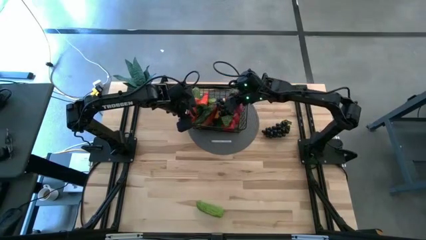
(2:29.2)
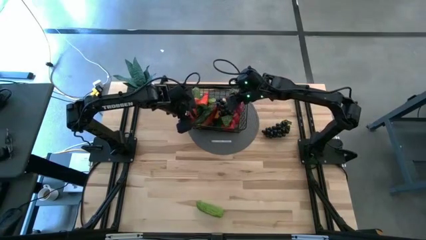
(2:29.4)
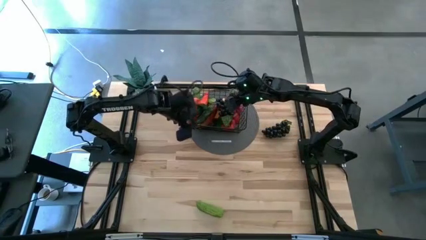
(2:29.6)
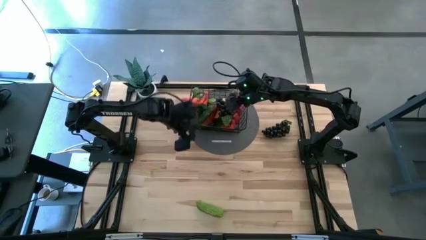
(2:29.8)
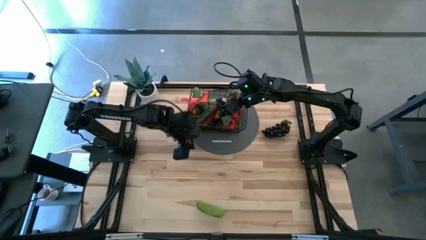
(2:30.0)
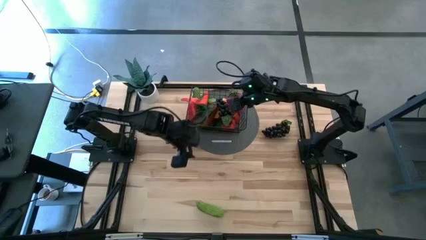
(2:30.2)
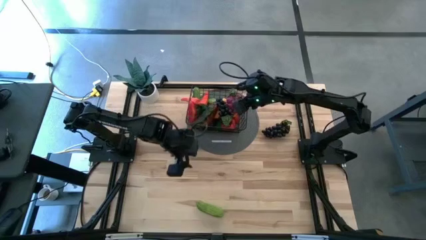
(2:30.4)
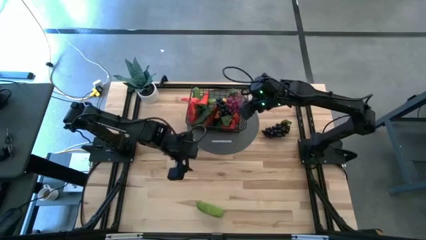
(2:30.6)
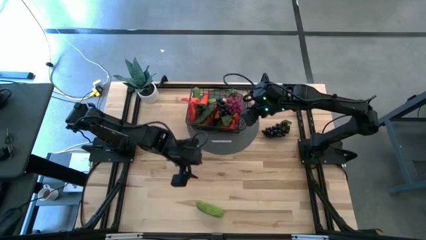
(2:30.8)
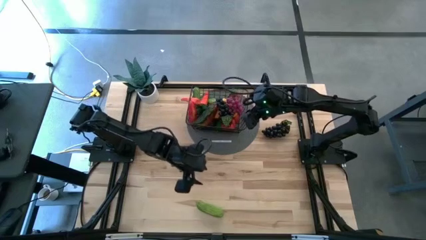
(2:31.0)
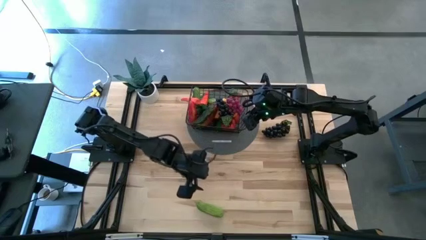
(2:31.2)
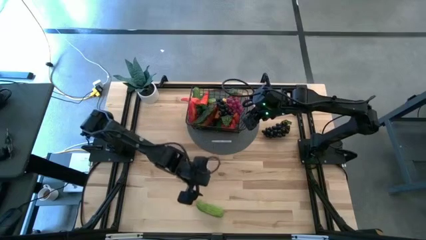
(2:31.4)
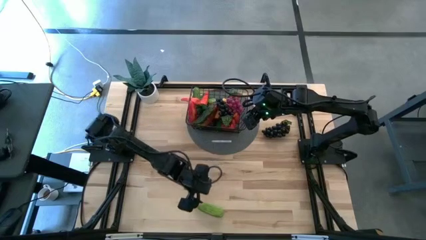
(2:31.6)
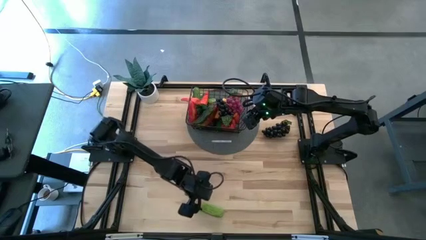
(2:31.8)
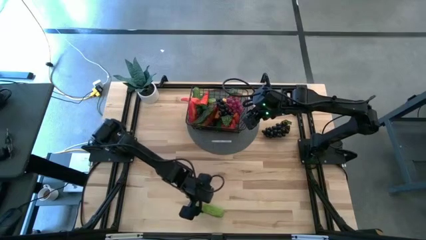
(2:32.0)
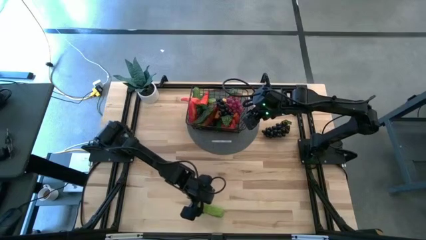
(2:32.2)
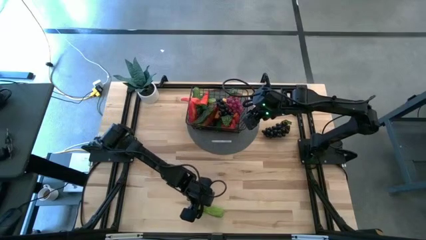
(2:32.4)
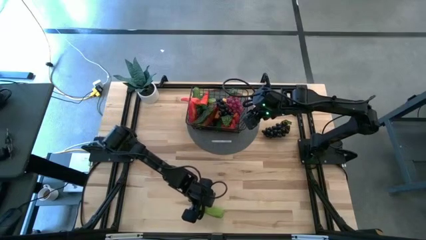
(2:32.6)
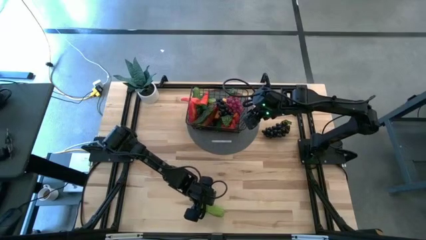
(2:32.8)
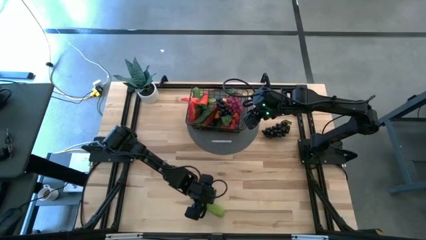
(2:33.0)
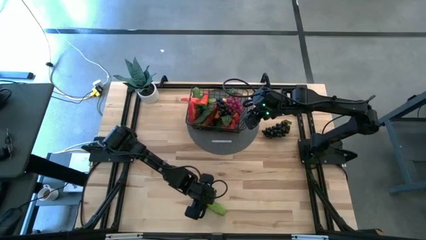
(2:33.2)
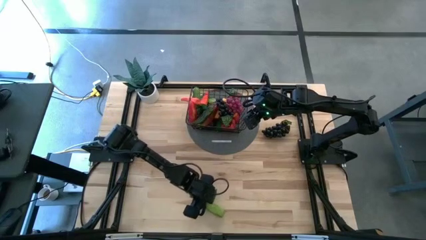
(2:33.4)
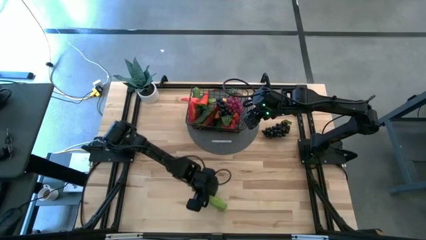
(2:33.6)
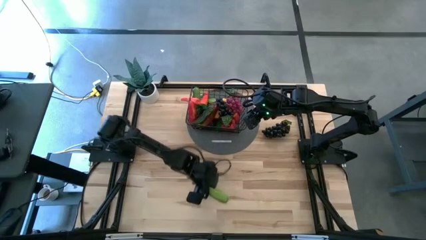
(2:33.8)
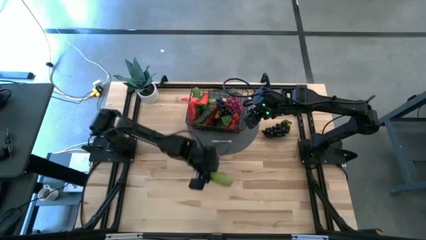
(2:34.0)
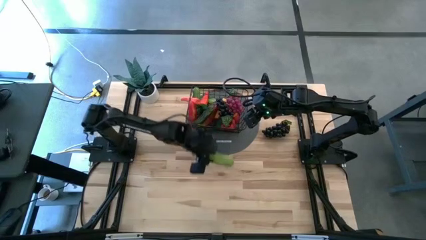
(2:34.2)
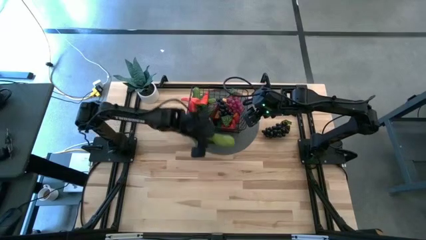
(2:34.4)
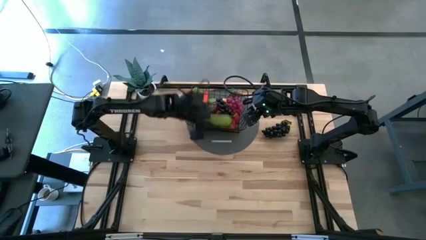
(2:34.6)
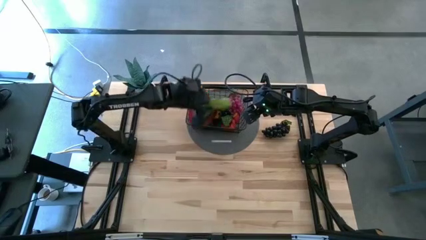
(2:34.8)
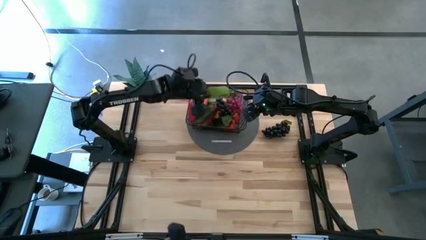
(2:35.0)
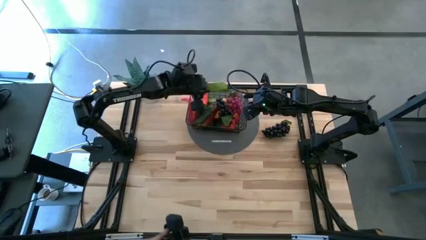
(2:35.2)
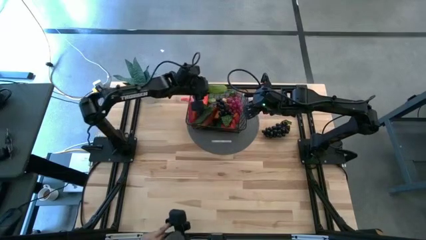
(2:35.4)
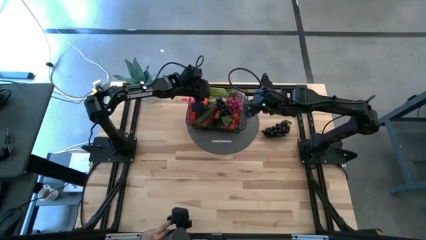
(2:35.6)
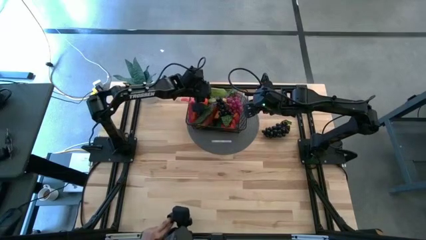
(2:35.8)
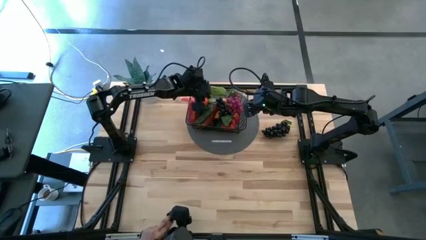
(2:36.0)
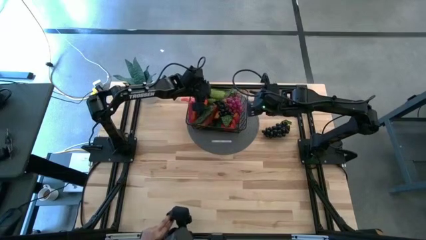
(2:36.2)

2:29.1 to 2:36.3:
Task: Build produce basket
Put the cucumber into the wire basket

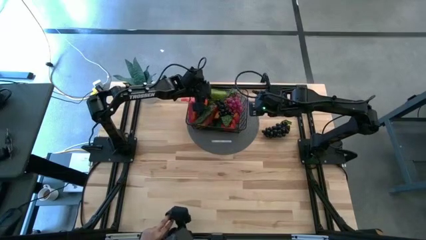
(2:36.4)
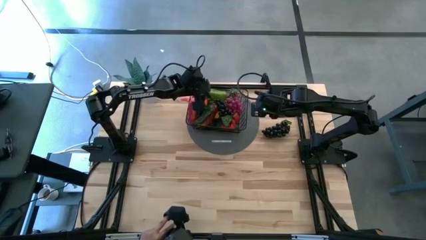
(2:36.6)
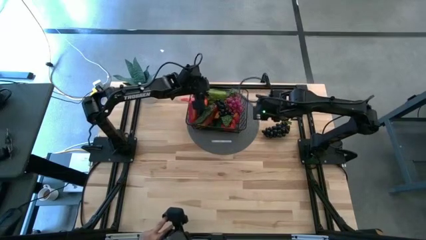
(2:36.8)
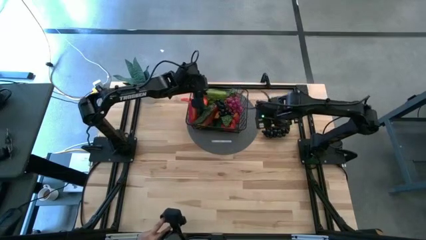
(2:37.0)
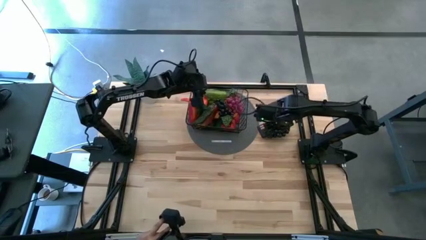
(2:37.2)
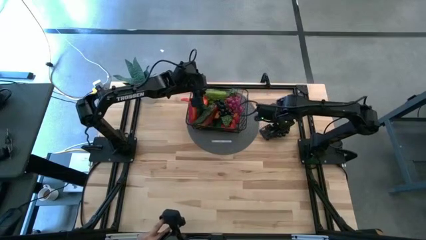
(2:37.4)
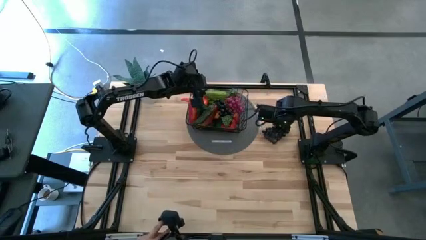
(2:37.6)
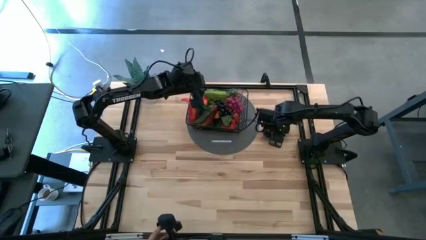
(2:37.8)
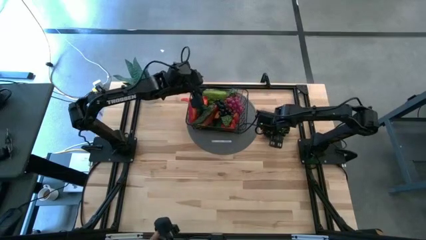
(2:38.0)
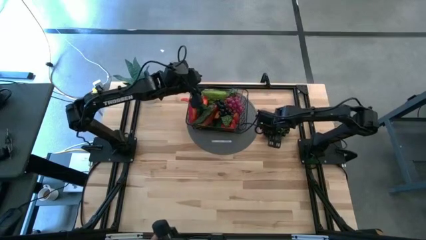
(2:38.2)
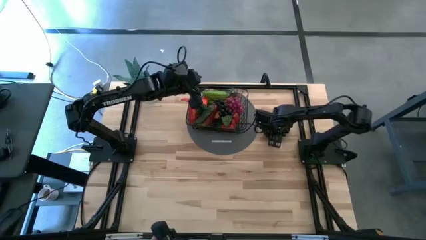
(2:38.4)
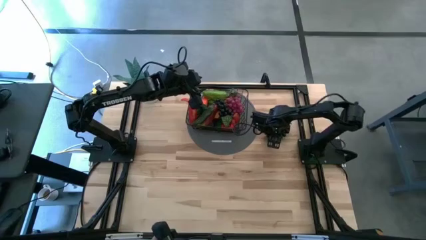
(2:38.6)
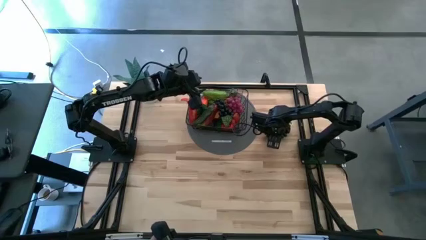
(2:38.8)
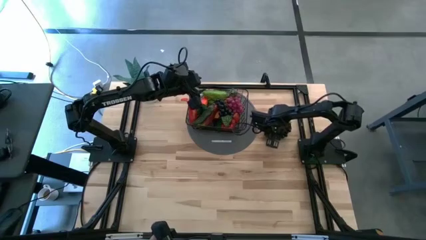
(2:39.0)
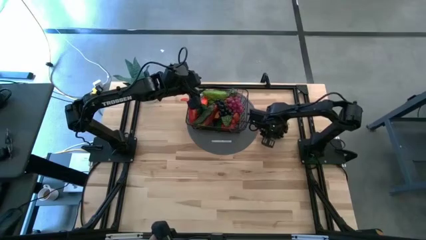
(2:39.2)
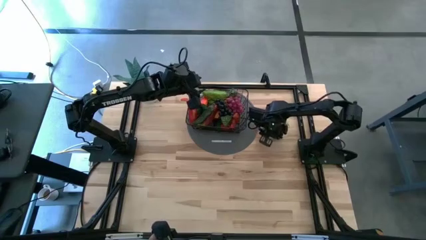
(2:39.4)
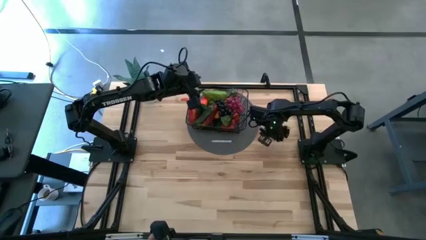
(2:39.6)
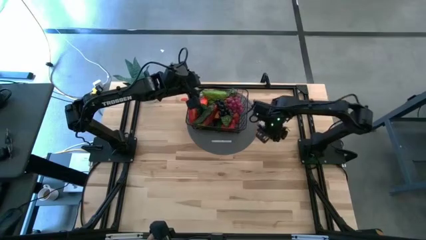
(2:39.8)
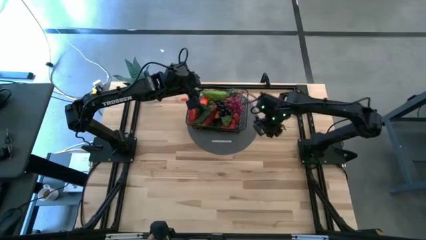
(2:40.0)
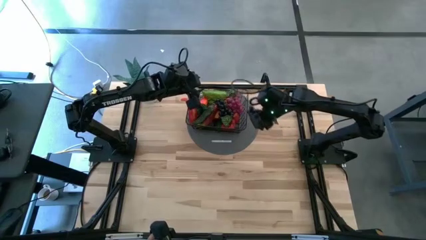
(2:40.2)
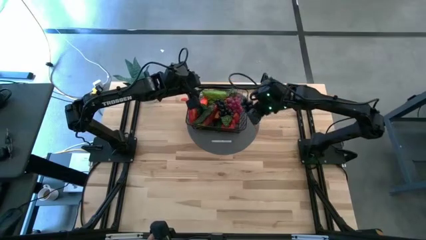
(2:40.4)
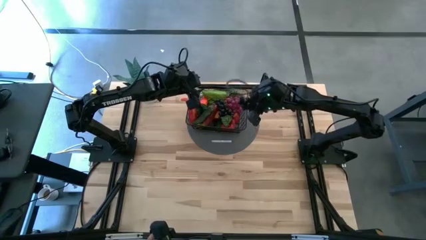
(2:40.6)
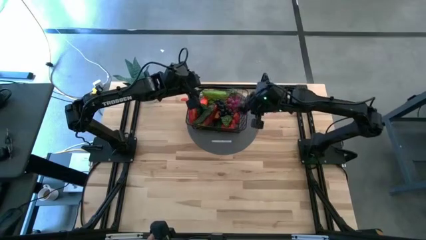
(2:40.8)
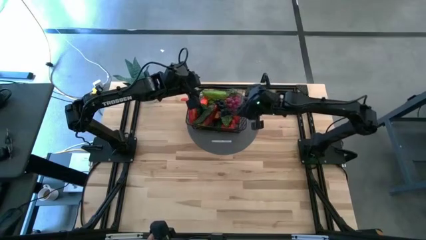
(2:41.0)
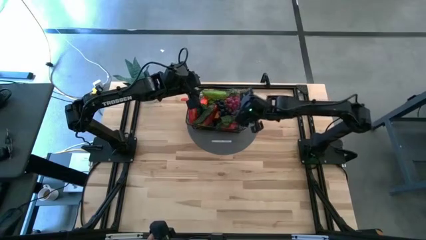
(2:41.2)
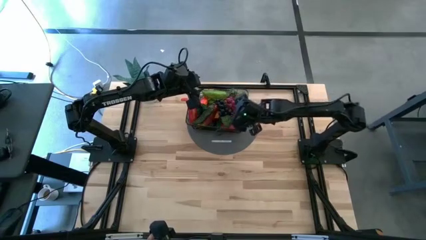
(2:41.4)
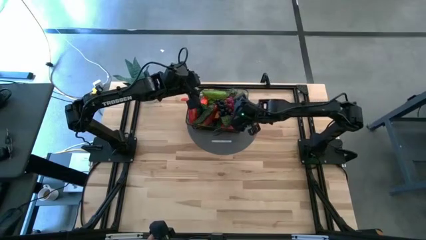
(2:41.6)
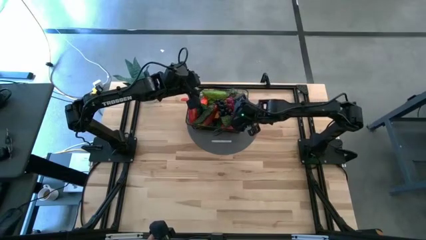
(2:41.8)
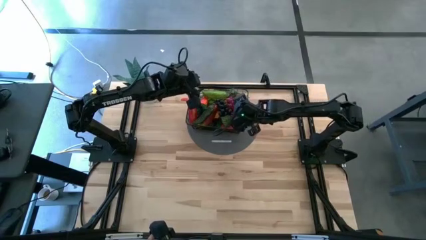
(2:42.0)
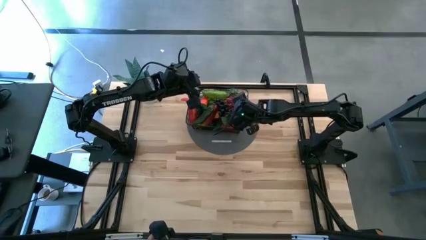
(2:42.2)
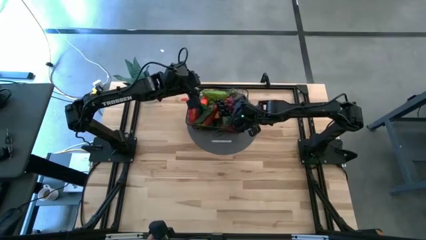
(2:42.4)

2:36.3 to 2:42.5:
Put the black grapes into the wire basket

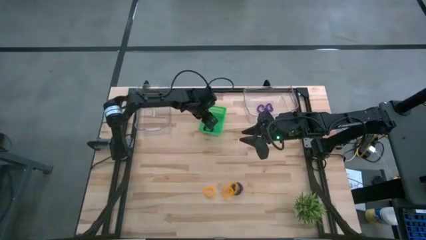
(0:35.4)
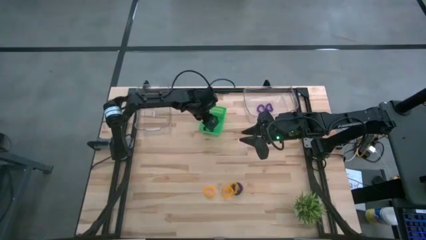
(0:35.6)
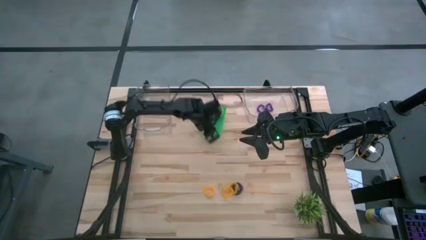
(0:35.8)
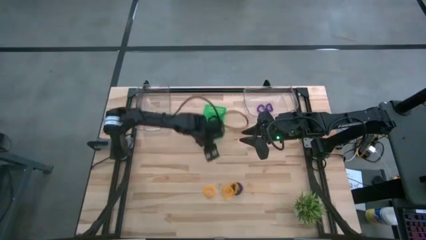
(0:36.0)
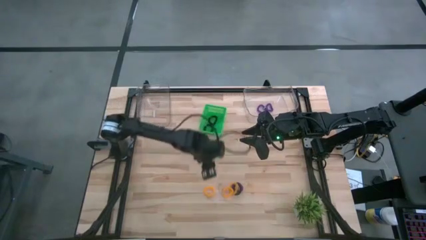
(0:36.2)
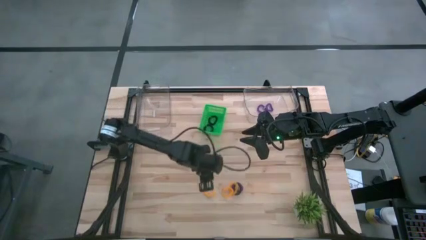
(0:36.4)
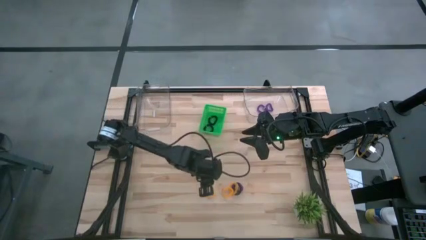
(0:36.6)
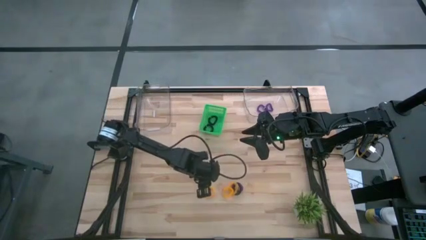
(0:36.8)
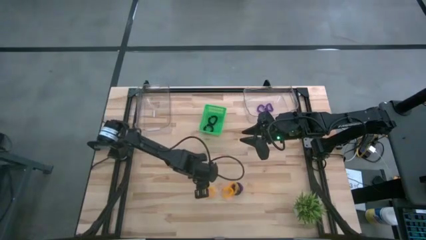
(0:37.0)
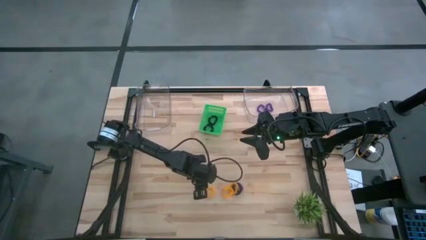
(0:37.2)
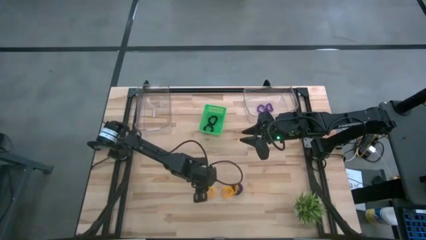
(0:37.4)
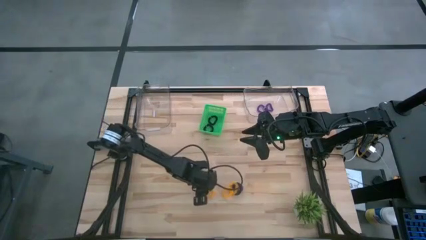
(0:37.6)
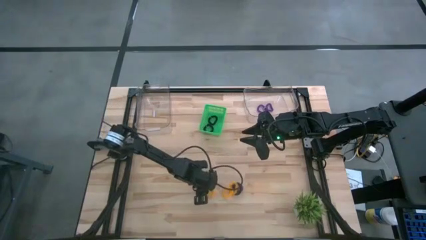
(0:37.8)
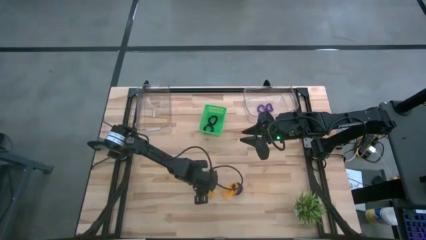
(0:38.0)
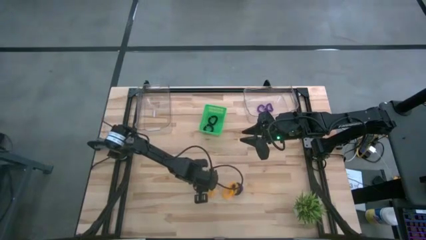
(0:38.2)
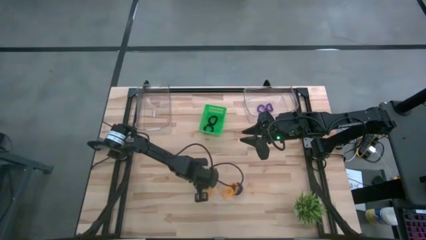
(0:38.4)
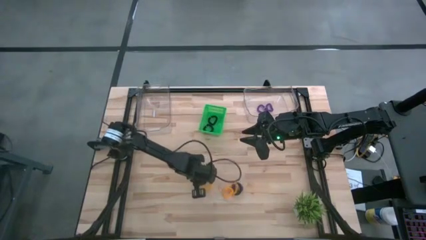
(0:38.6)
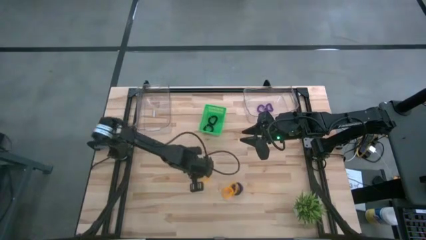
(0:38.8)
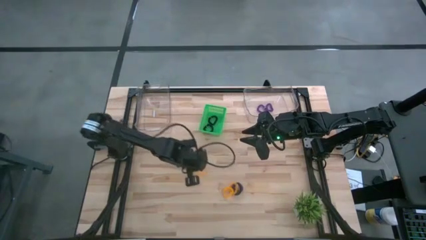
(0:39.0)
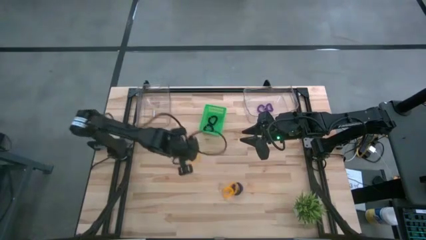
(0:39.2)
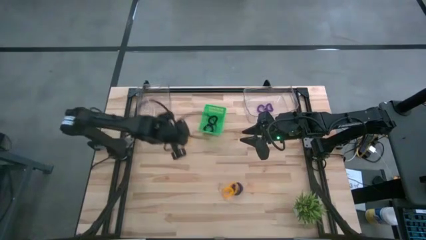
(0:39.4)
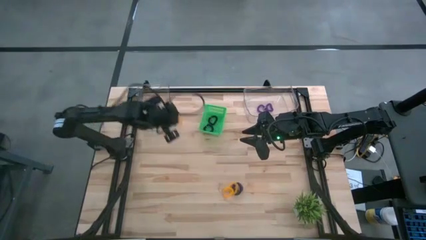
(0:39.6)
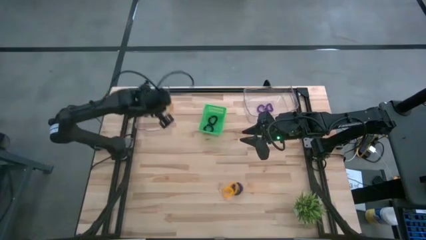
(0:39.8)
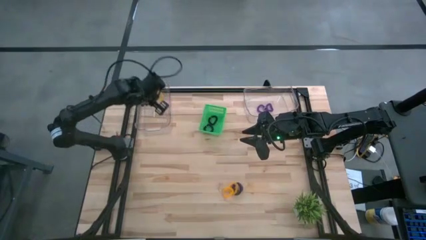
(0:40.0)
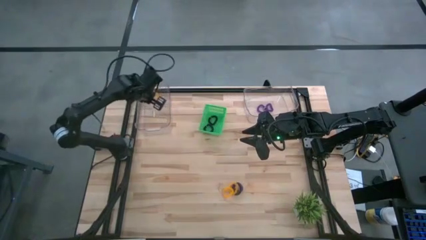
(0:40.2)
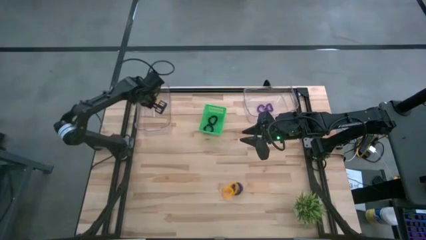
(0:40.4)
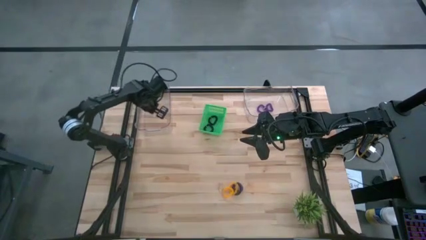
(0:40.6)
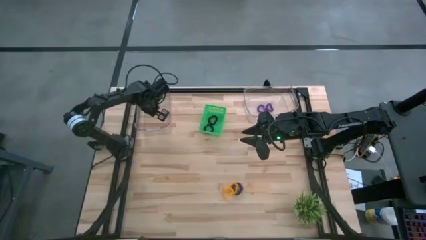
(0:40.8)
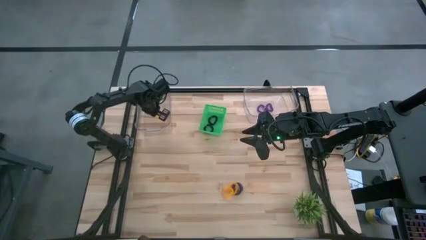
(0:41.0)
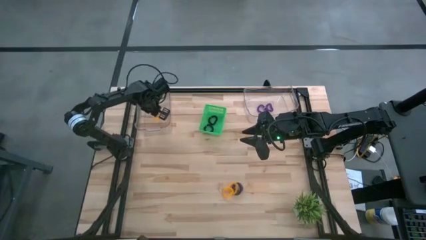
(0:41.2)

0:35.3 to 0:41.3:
Task: Sort spring keychains
Put the yellow spring keychain into the left transparent bin
